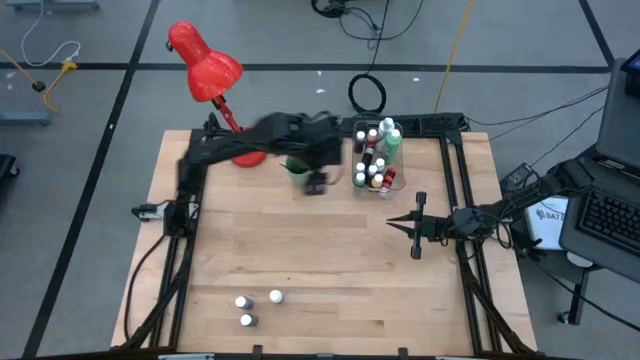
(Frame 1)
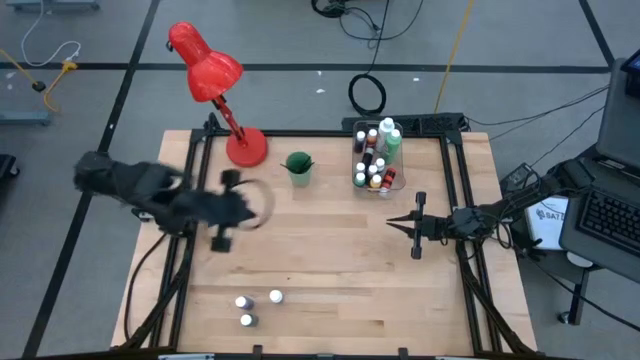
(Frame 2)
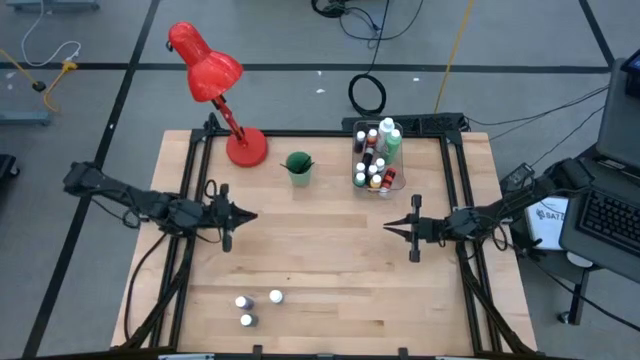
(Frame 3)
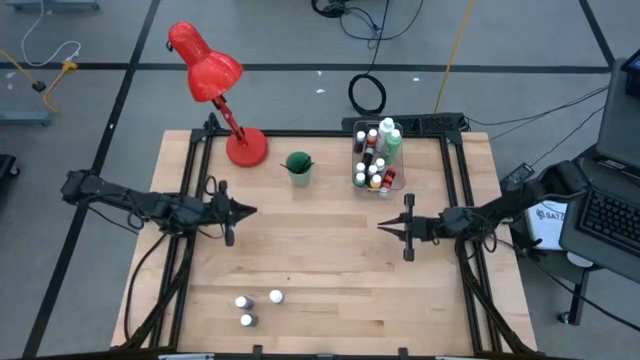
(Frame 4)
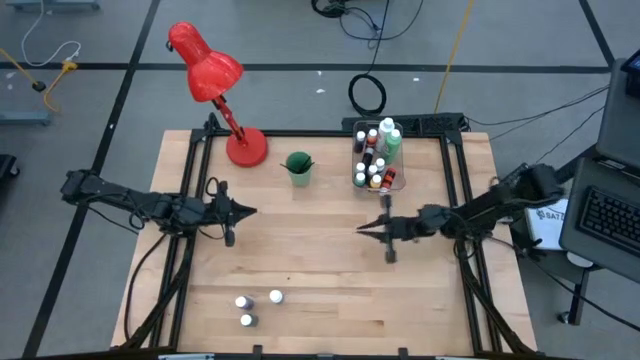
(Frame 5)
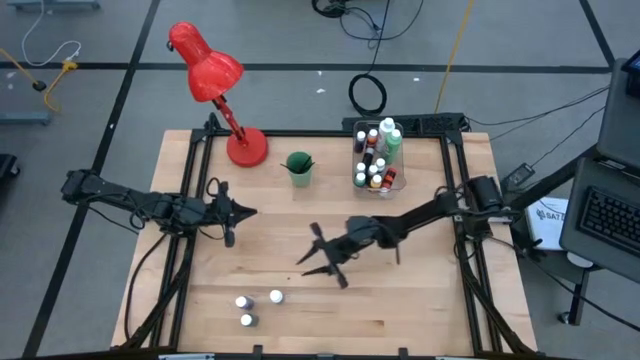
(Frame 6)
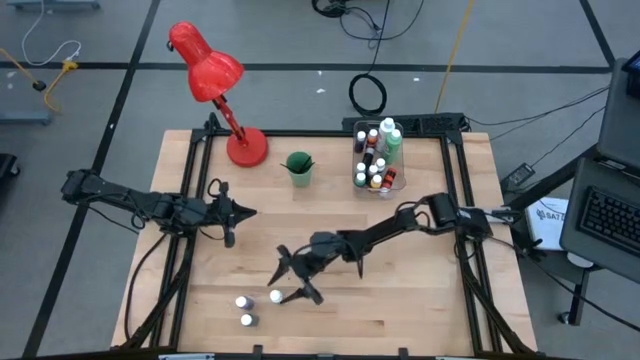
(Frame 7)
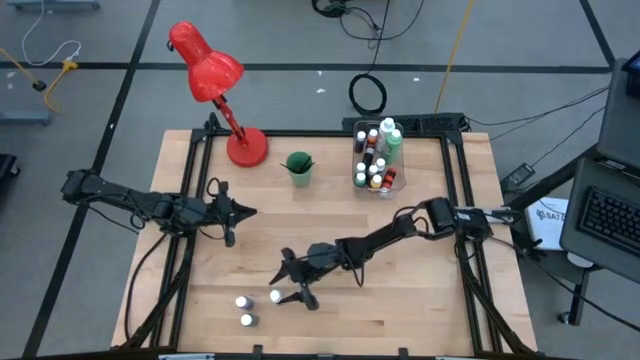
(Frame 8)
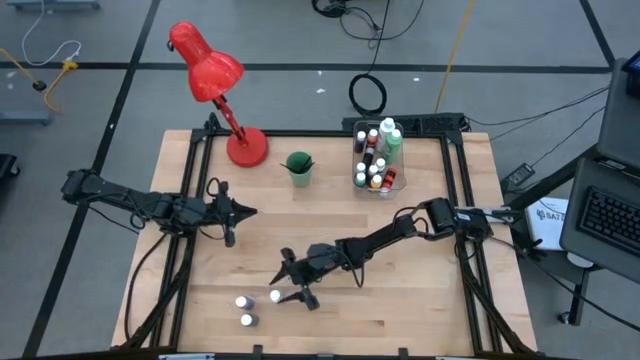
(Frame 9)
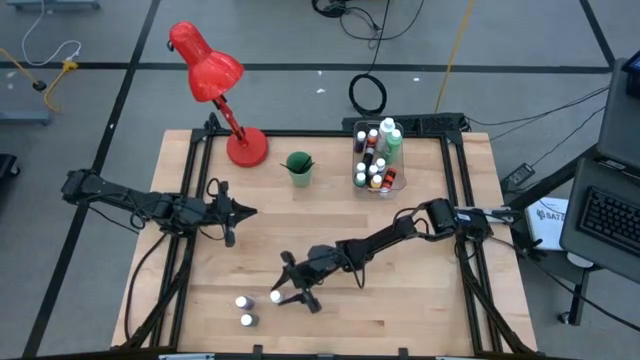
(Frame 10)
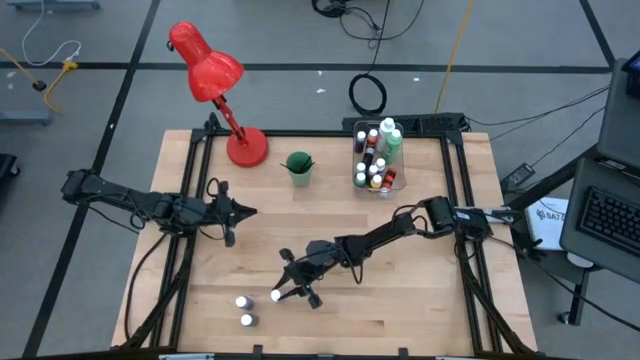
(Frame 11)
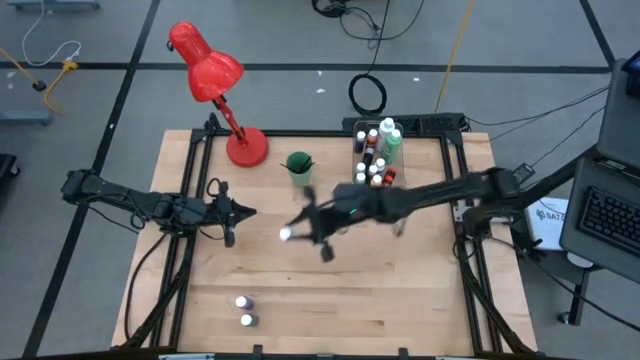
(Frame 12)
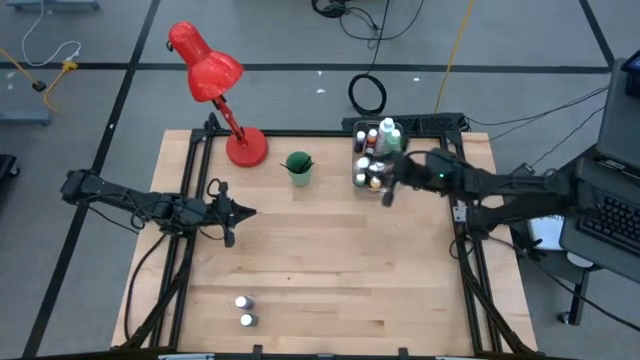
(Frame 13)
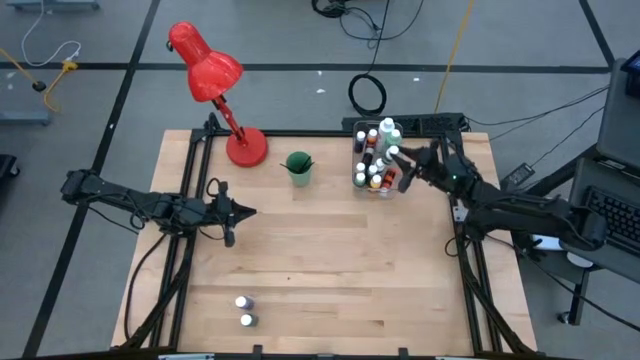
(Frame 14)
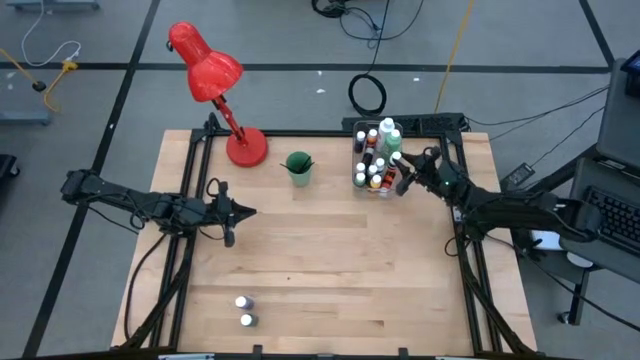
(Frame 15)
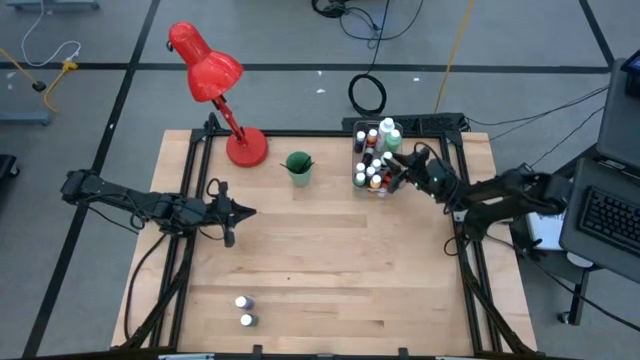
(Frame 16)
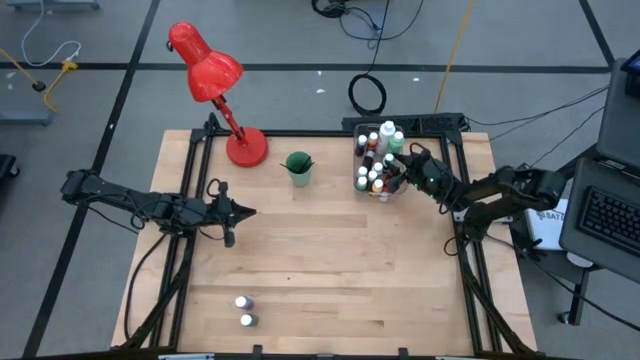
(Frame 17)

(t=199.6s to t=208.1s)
Task: Pick & Place Paint Supplies
Put the white paint bottle into the transparent bin

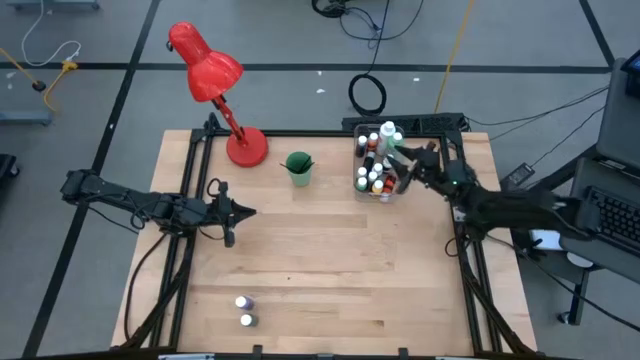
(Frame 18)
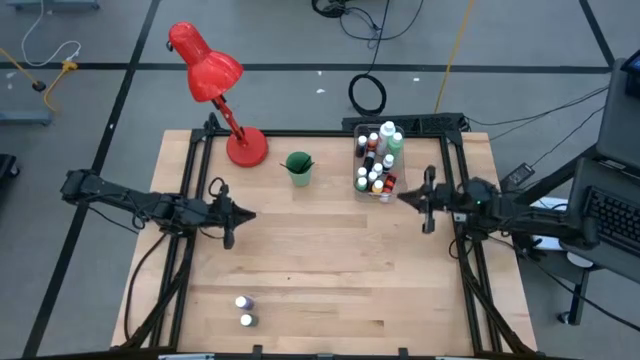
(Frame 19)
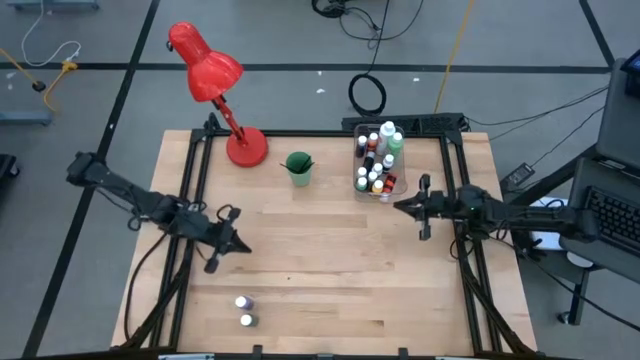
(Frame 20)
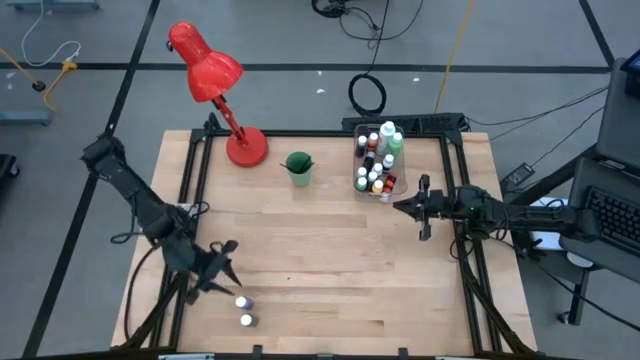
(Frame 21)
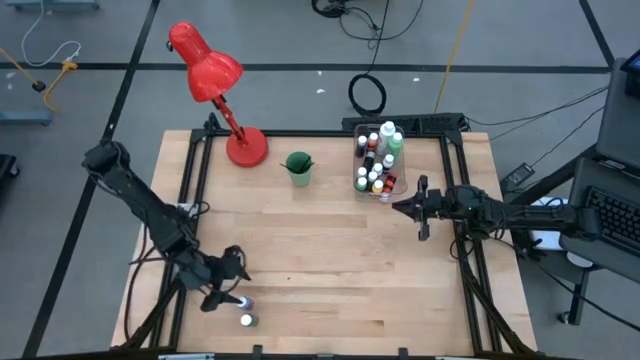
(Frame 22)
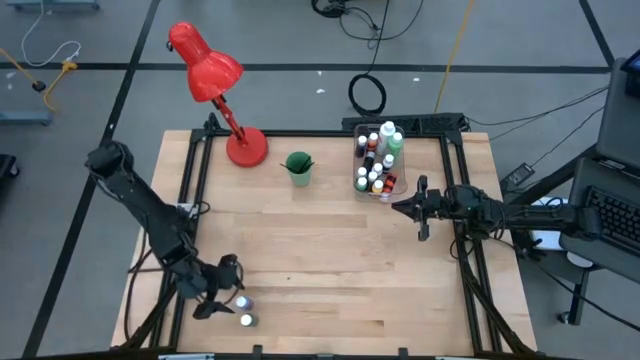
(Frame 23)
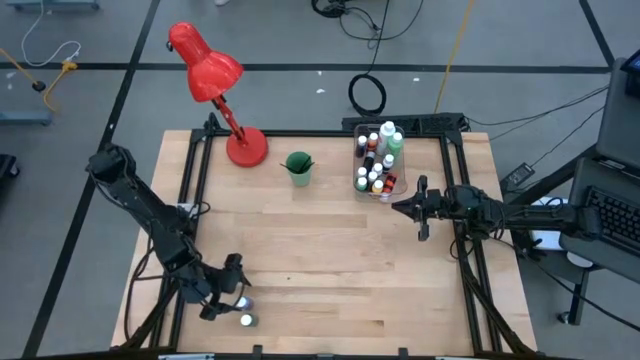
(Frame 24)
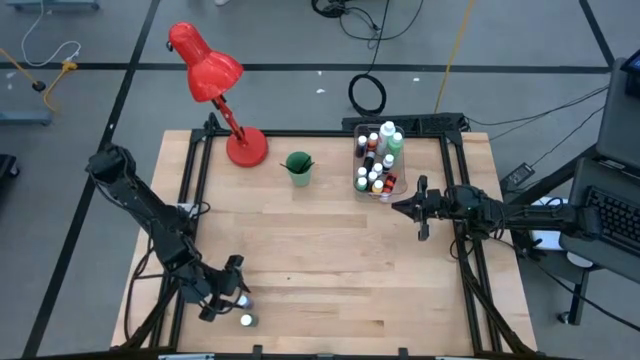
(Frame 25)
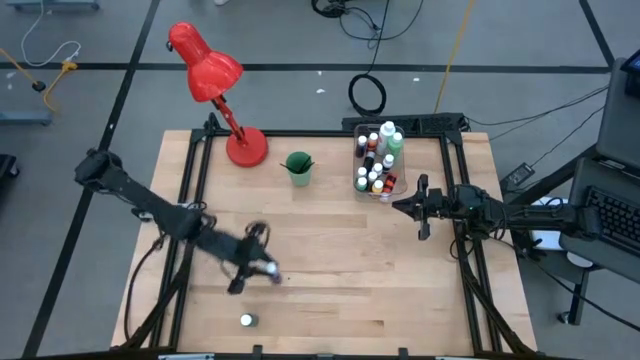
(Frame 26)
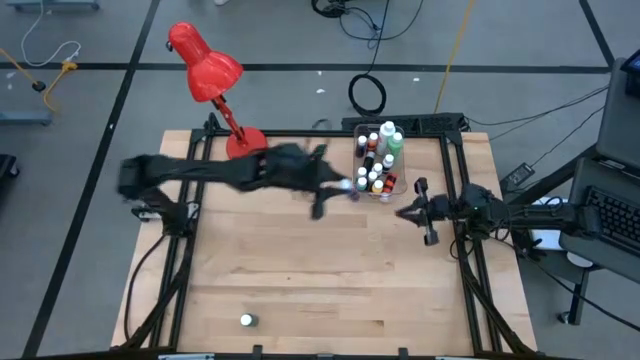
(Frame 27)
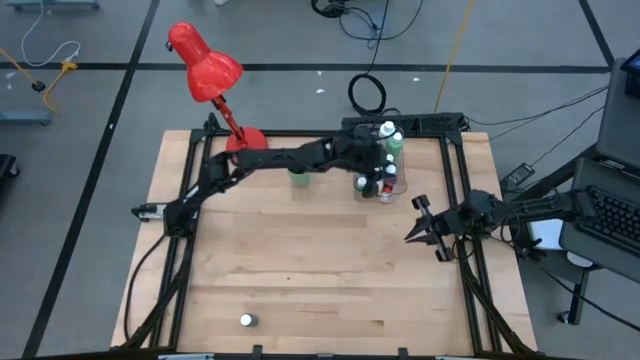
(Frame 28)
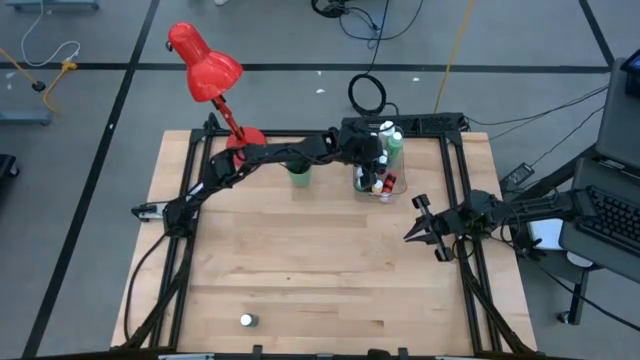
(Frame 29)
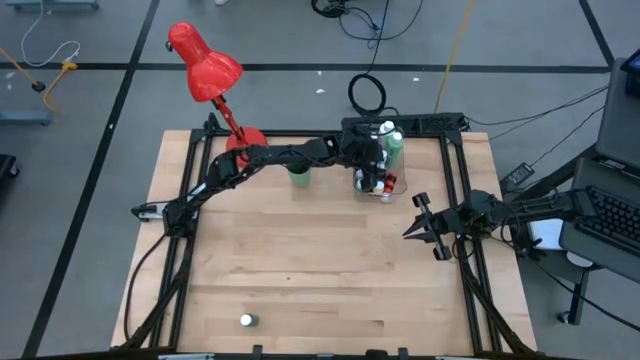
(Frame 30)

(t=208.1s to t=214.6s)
Put the violet paint bottle into the transparent bin

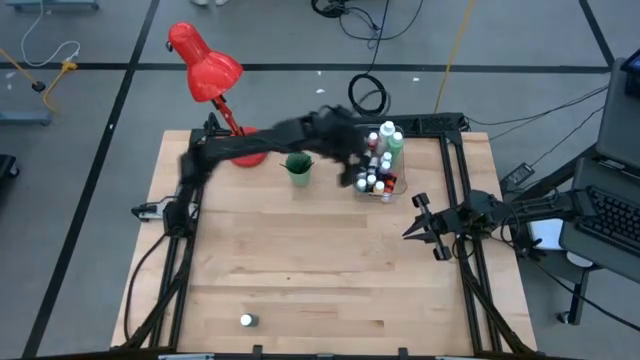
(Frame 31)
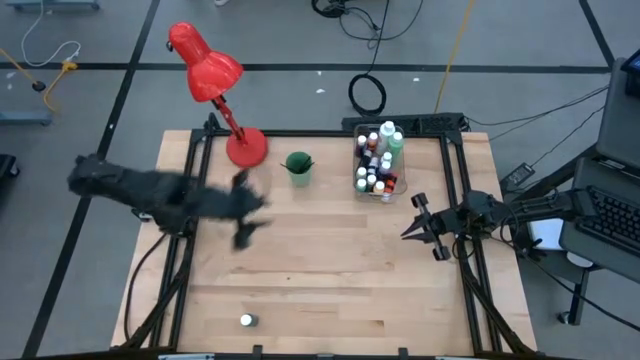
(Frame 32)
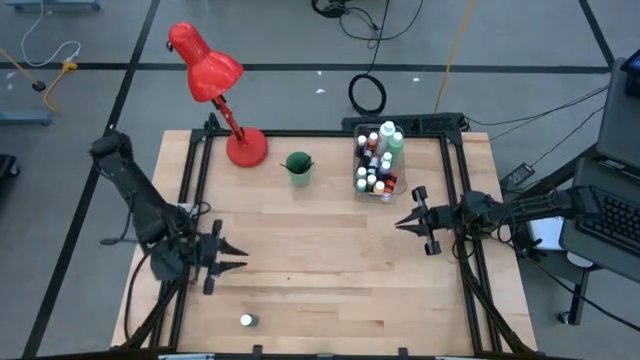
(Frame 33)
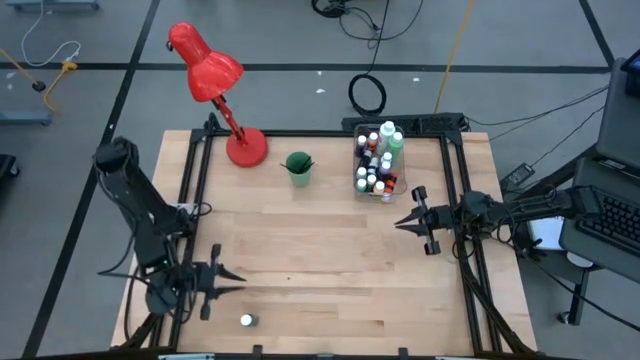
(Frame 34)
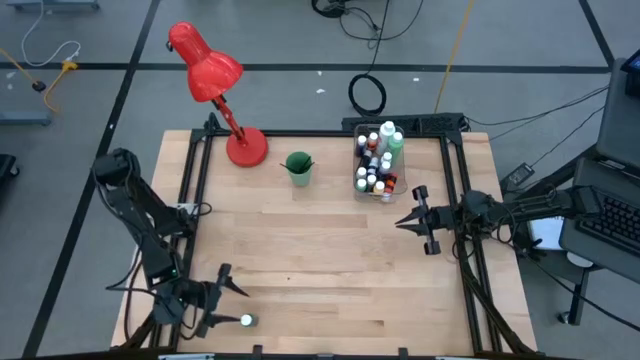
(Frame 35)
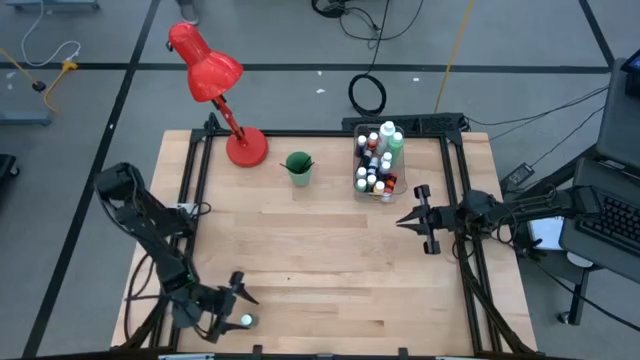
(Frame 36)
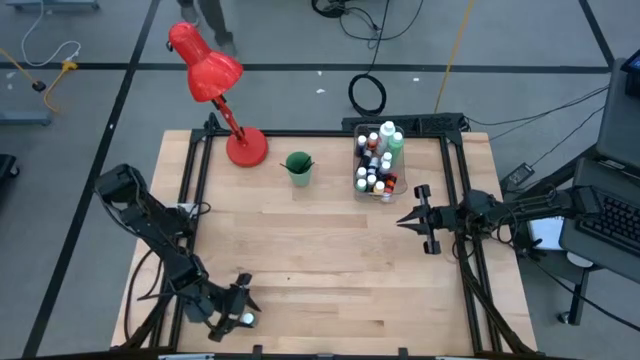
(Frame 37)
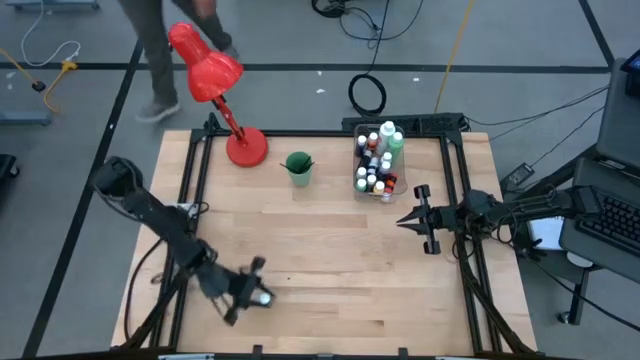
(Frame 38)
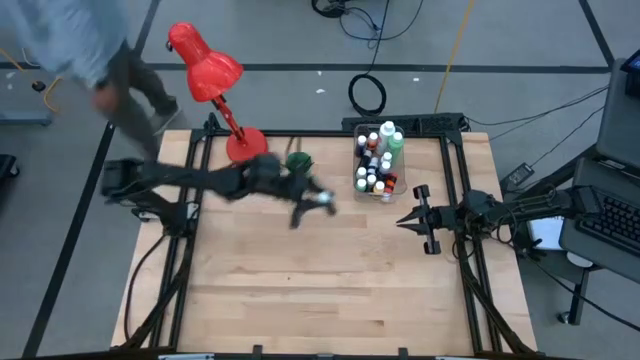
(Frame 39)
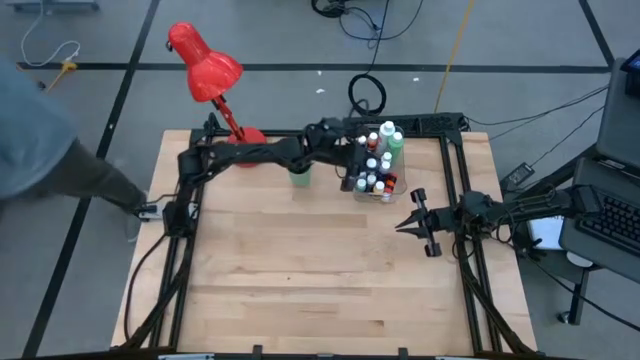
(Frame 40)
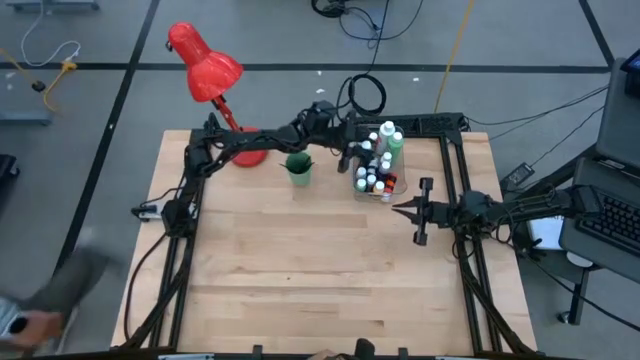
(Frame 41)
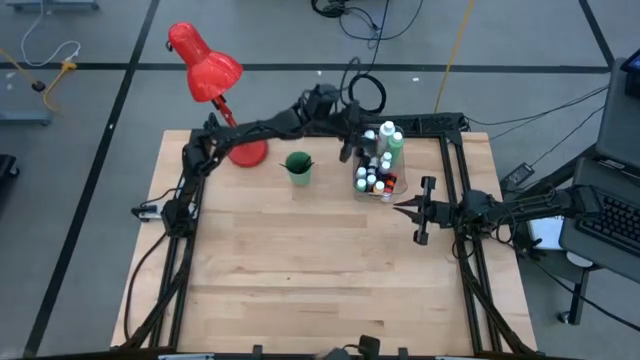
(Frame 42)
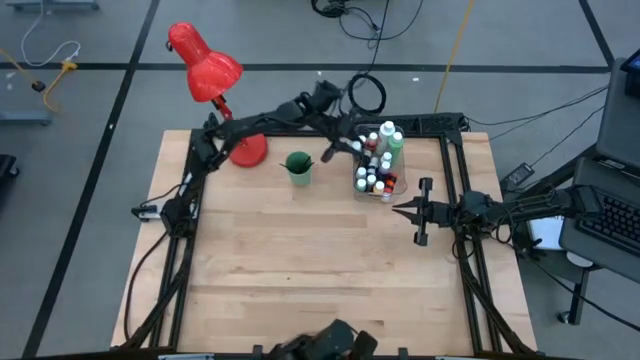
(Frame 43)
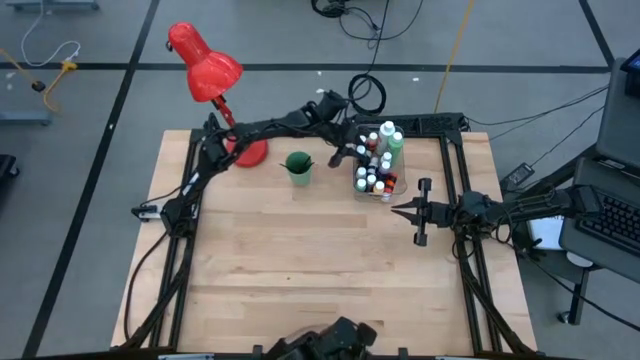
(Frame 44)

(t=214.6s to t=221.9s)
Put the dark green paint bottle into the transparent bin
